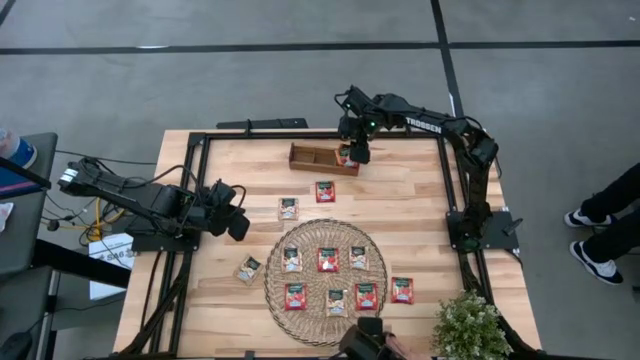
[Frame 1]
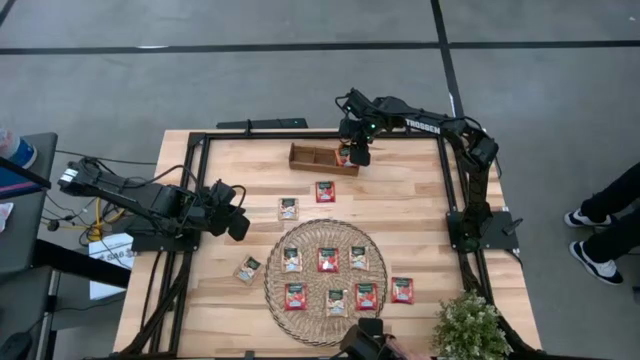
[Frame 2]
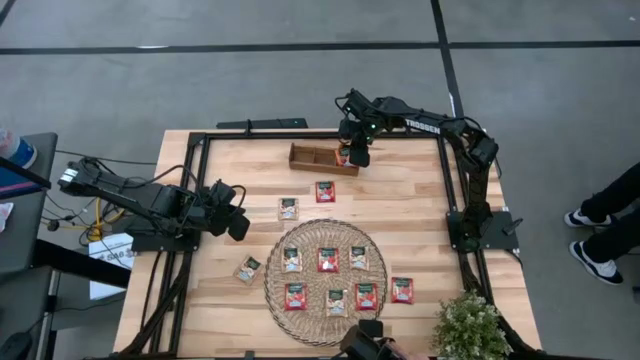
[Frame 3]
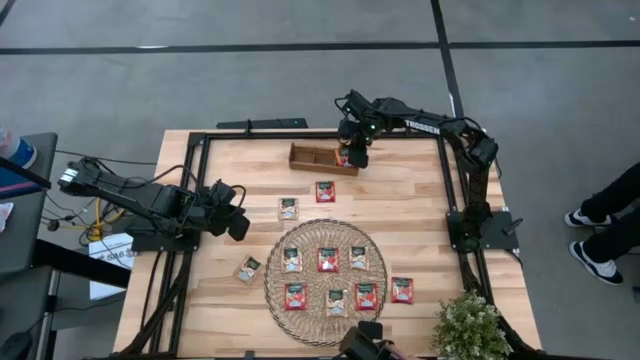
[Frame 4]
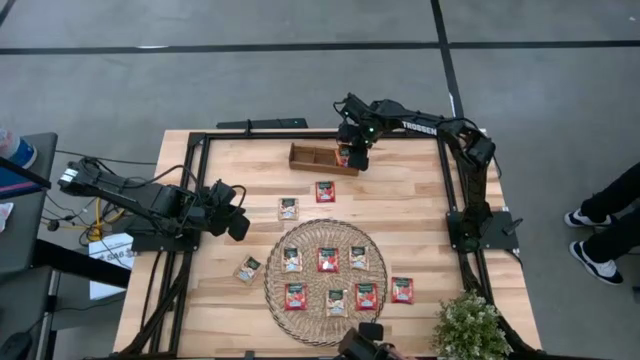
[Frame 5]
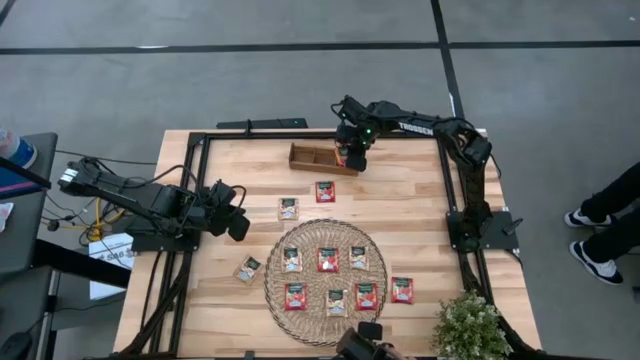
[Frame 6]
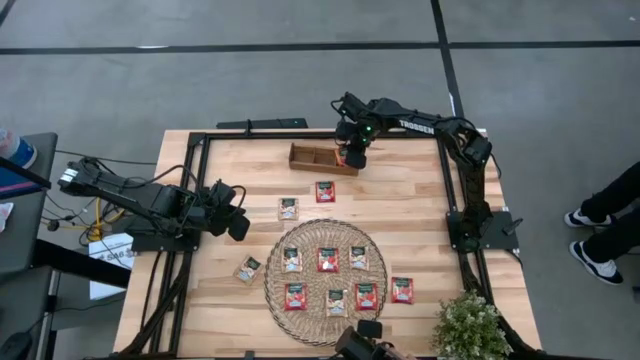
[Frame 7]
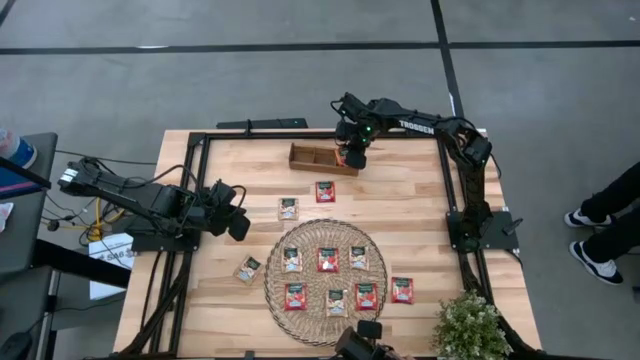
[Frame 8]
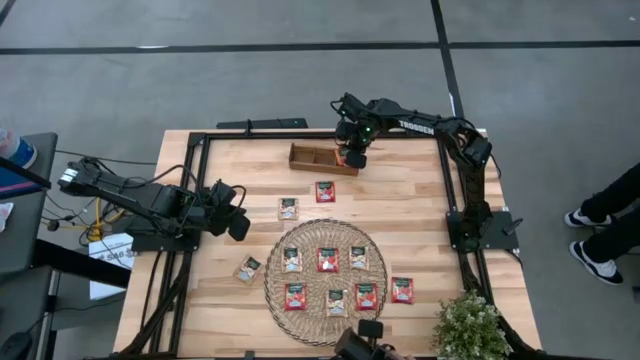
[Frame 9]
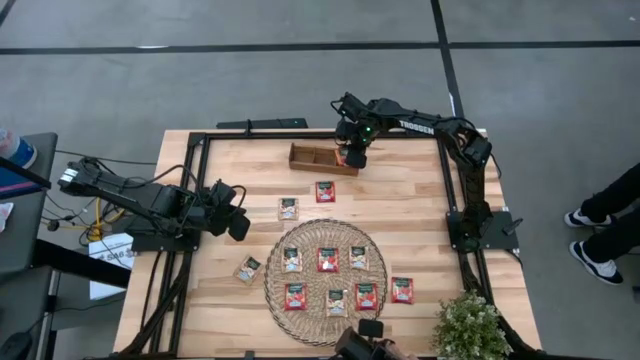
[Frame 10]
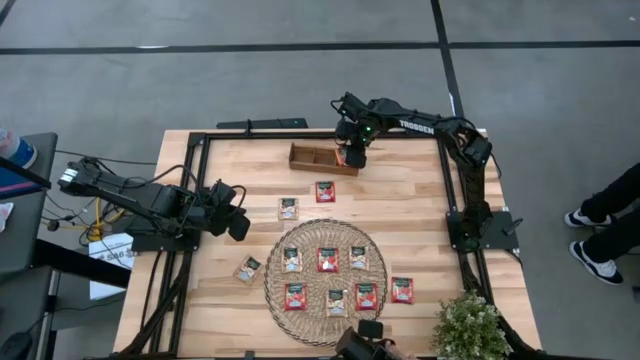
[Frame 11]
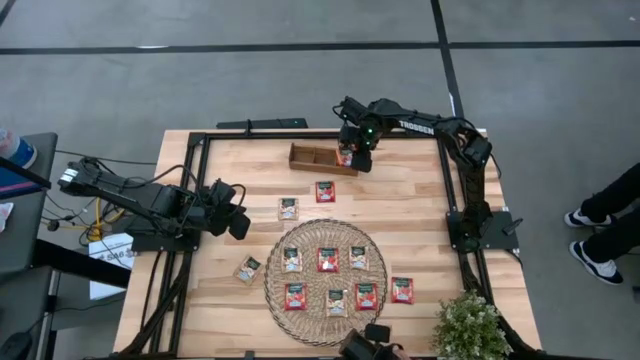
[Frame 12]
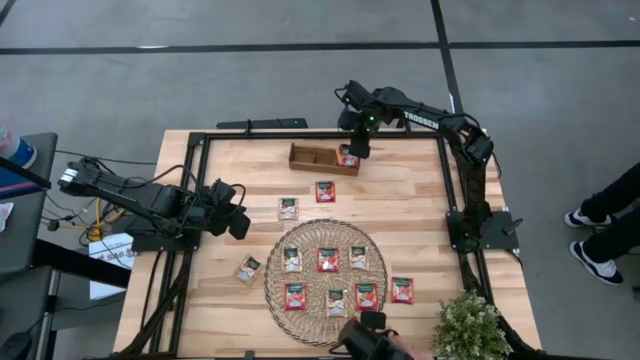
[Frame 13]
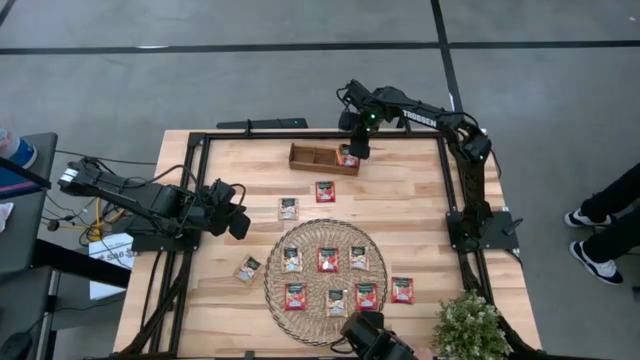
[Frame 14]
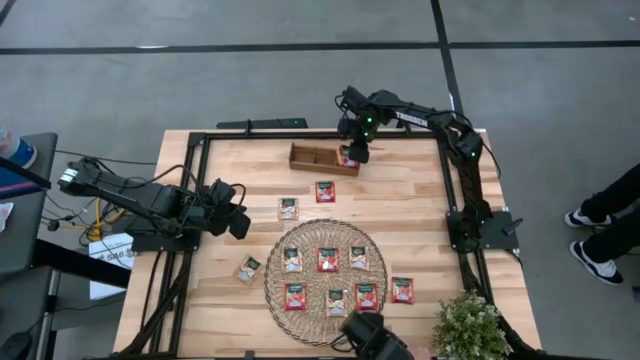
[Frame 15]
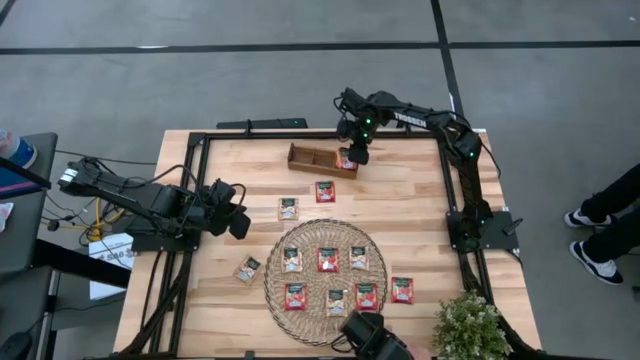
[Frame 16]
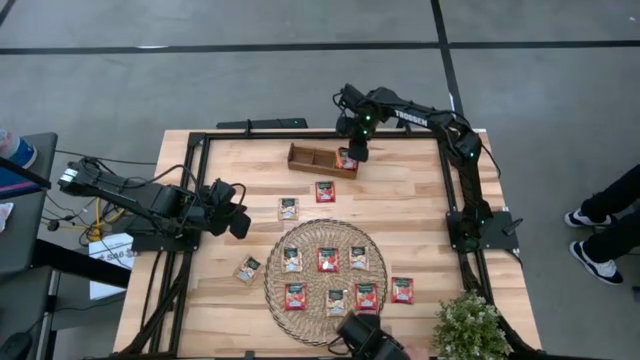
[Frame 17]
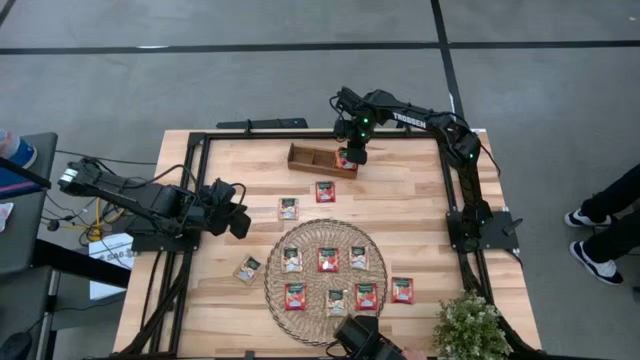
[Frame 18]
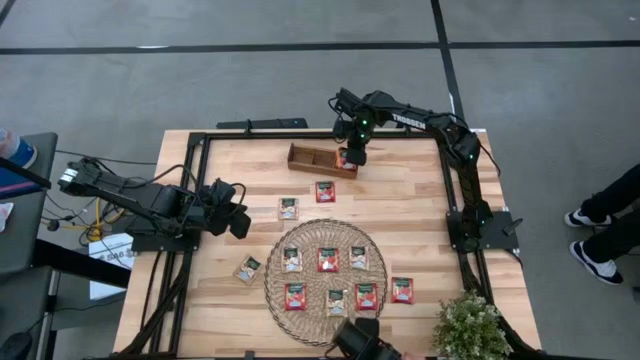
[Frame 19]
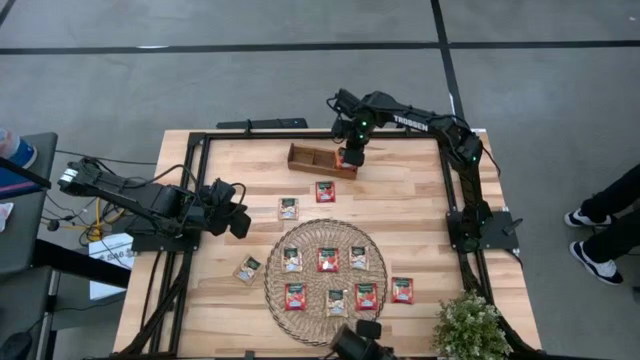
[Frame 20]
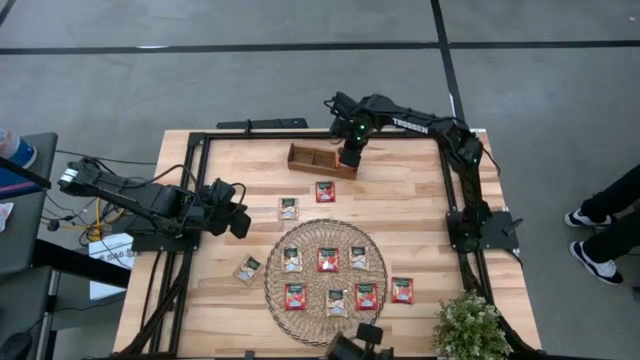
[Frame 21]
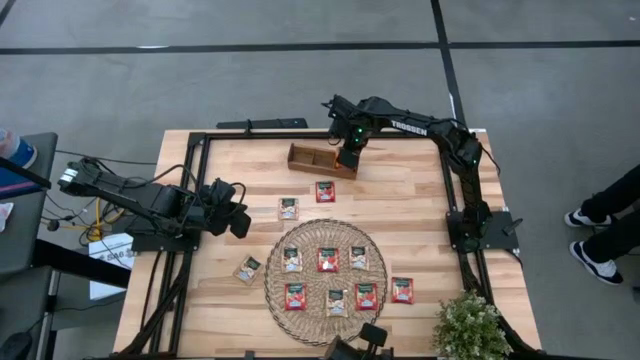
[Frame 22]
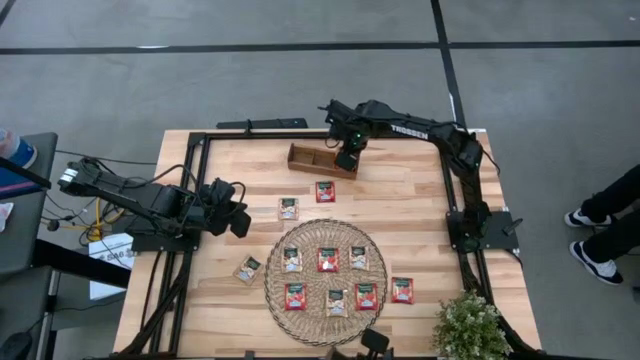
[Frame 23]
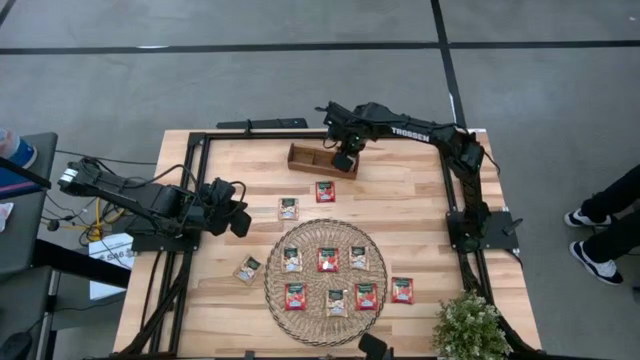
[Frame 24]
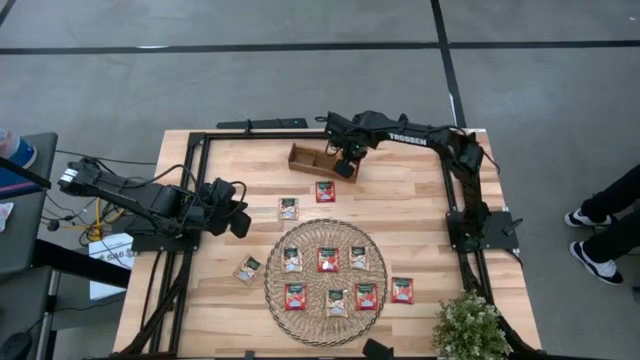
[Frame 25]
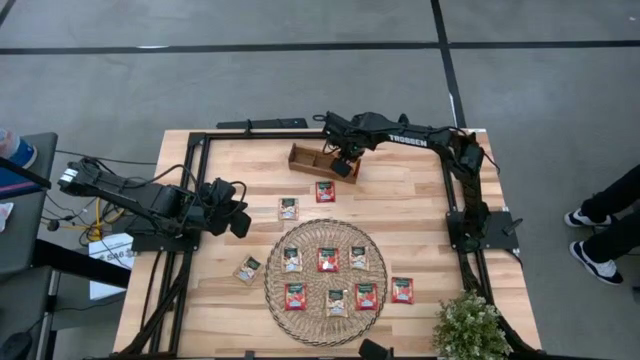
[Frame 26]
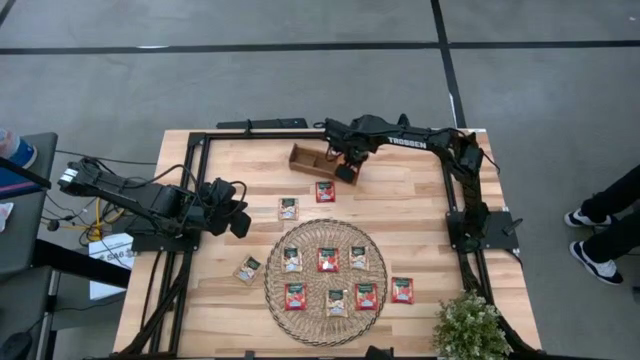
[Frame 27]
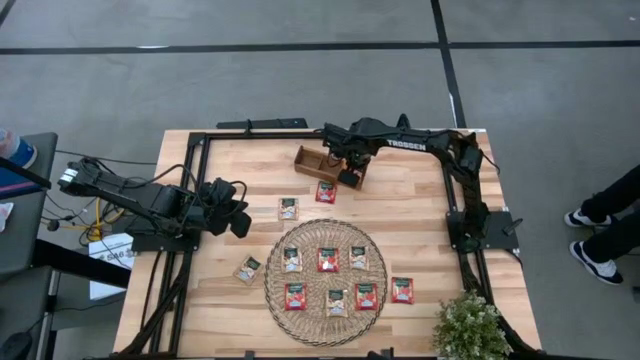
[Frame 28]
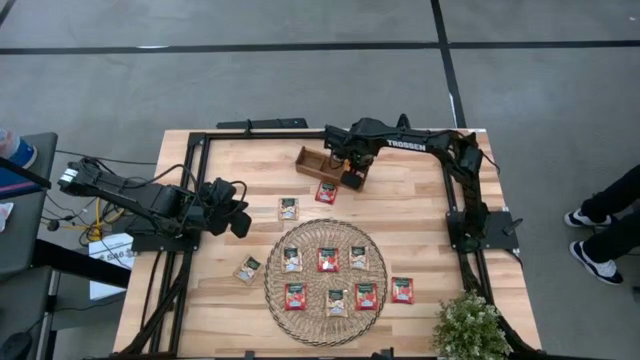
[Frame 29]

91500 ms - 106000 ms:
Task: Pick & Place Tea
Put the orange tea bag into the right section of the wooden organizer

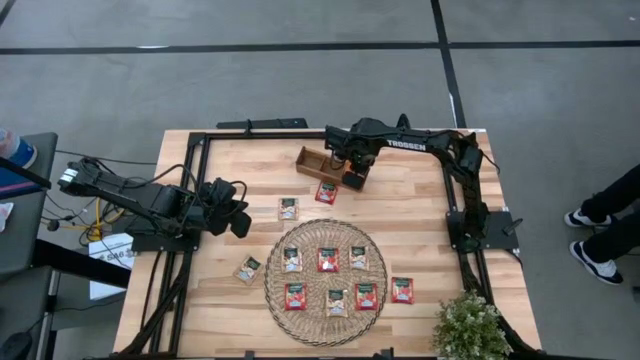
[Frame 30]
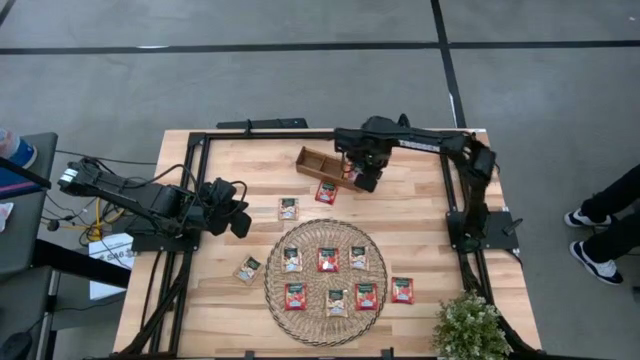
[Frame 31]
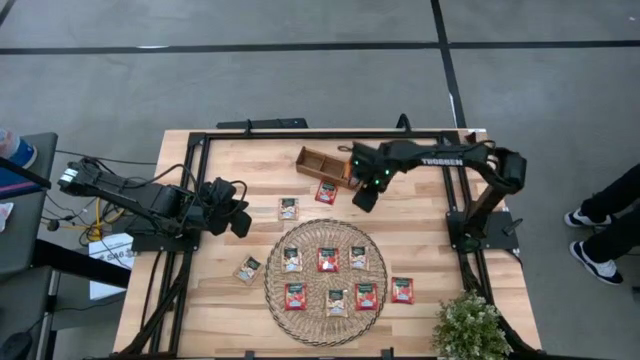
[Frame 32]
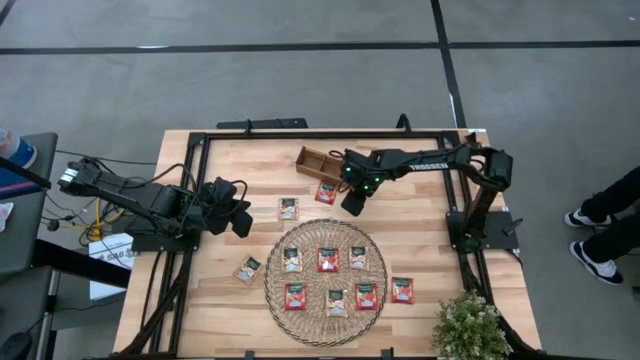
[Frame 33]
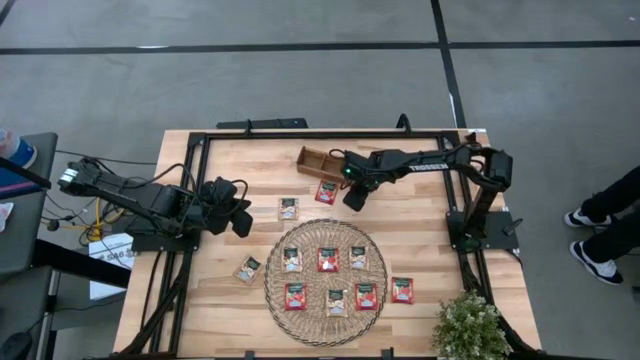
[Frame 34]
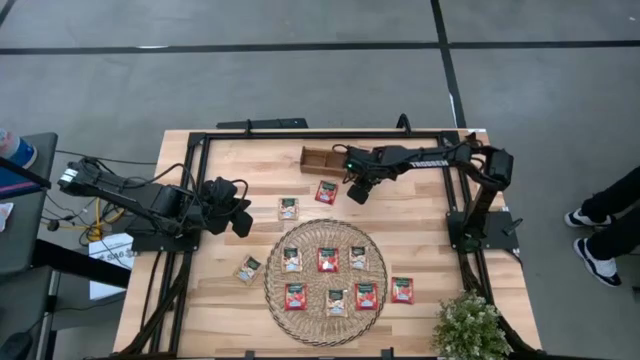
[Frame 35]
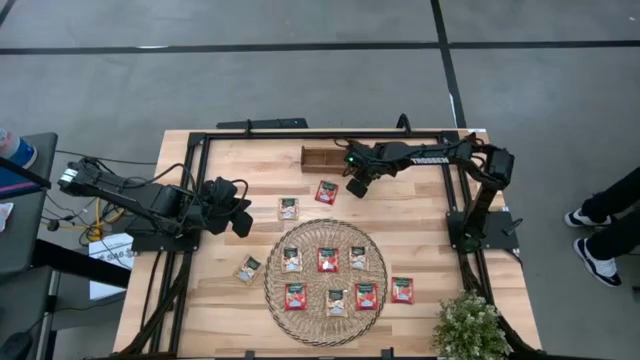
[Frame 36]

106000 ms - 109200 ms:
Adjust the wooden organizer

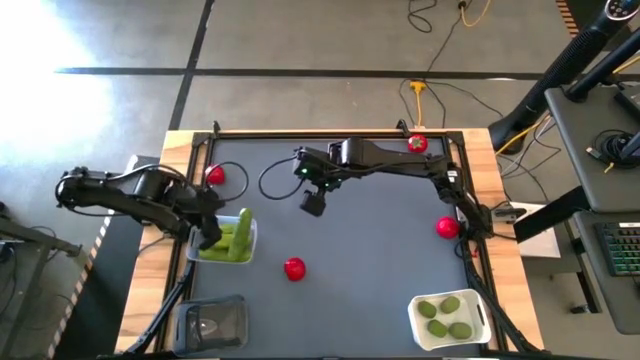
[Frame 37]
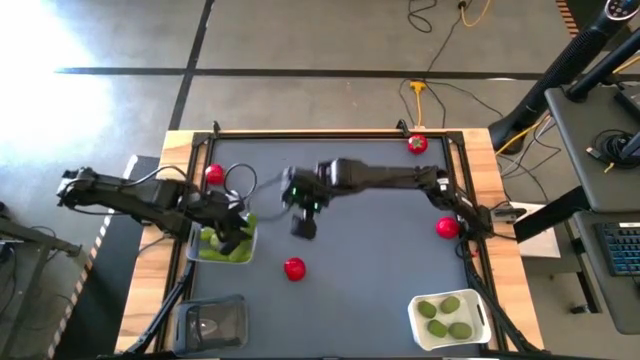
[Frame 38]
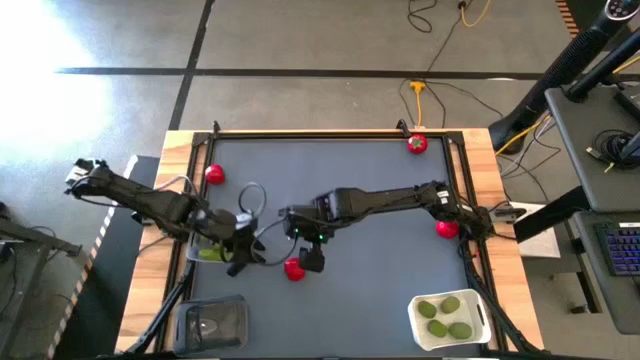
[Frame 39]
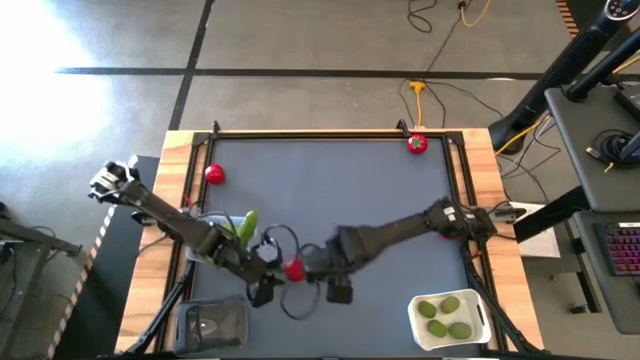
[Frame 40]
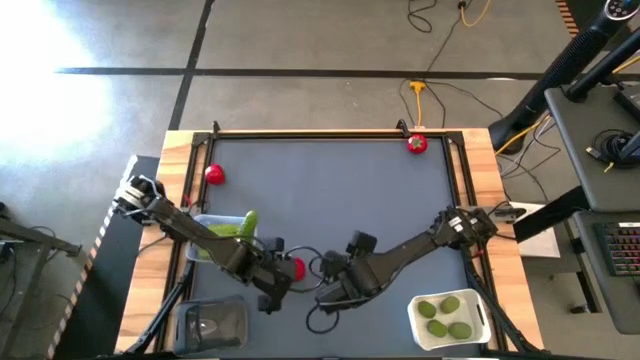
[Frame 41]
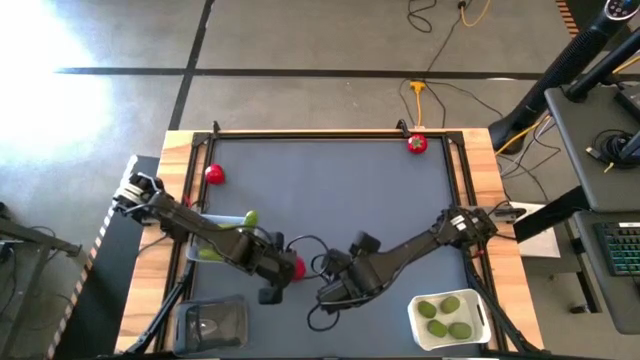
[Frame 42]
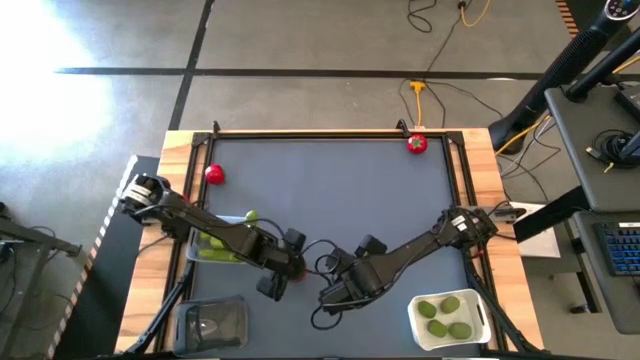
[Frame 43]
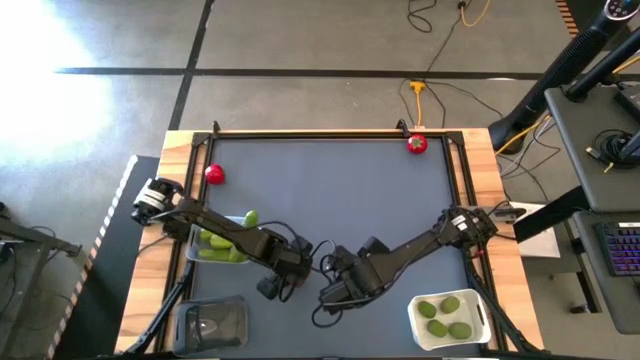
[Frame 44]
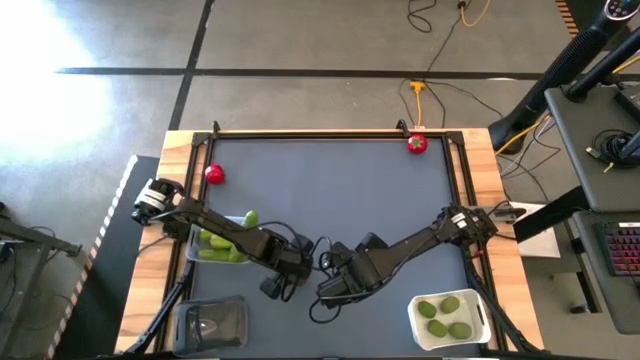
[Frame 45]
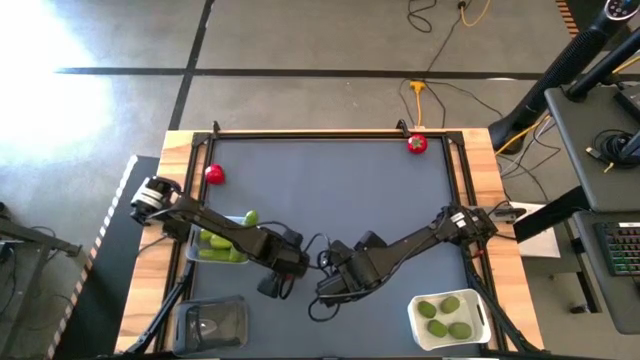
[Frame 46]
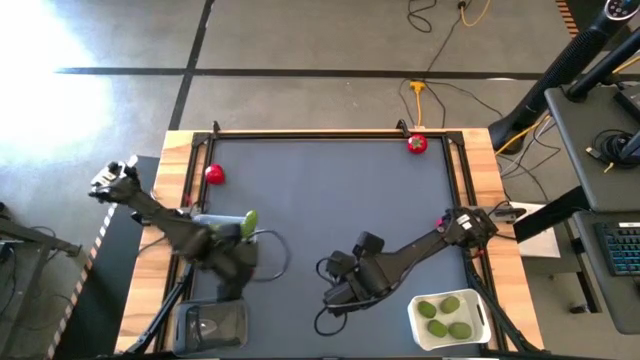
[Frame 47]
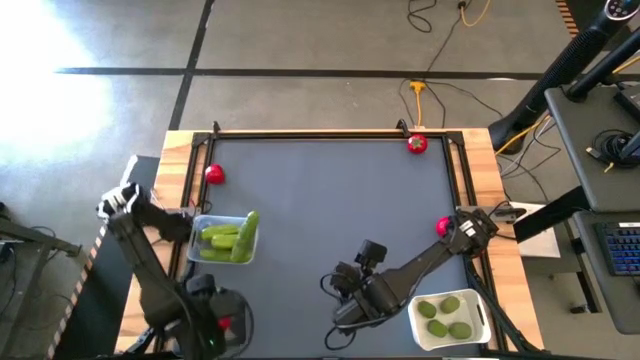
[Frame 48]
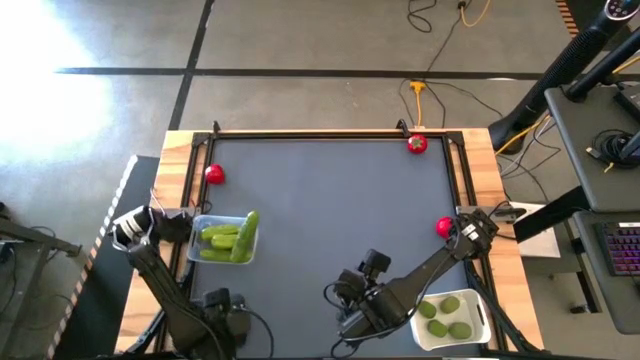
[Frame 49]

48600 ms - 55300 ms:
Task: Sort produce into baskets
Put the bottom left tomato into the black bin
